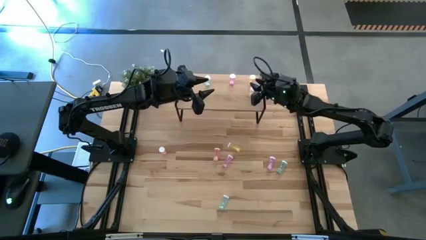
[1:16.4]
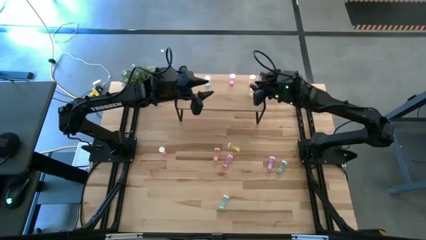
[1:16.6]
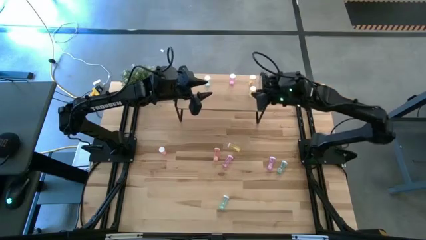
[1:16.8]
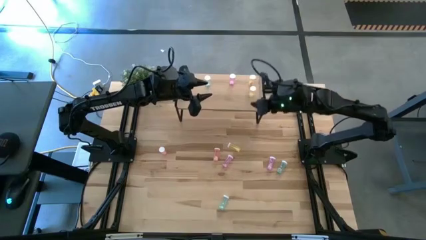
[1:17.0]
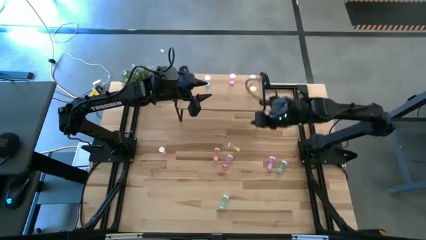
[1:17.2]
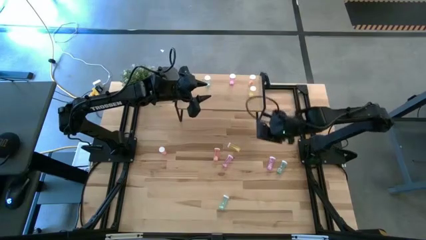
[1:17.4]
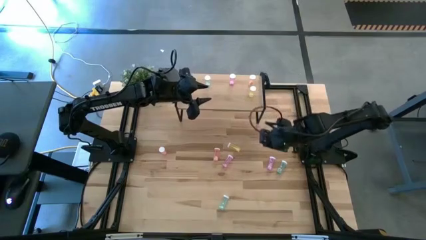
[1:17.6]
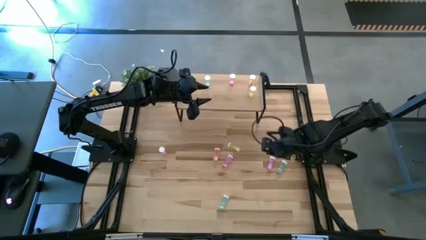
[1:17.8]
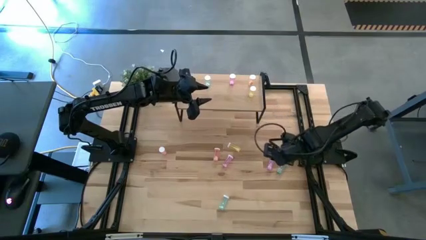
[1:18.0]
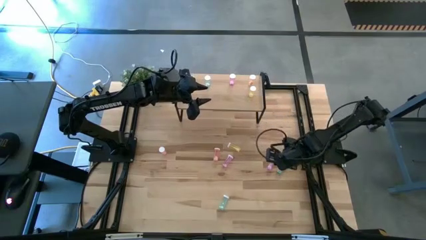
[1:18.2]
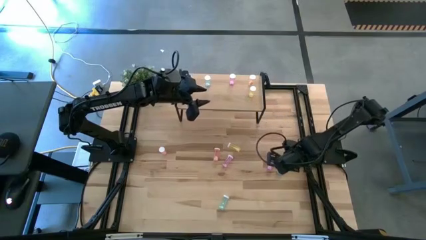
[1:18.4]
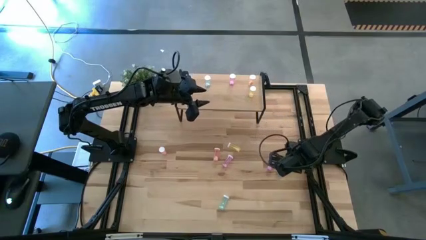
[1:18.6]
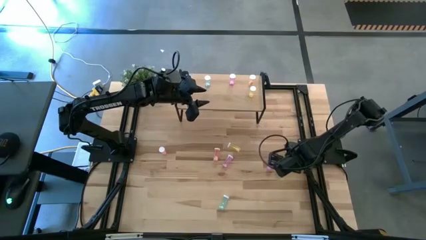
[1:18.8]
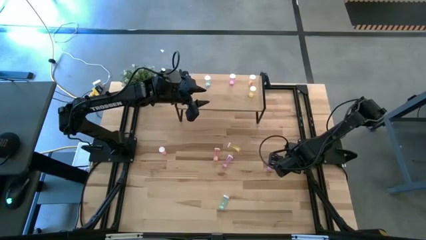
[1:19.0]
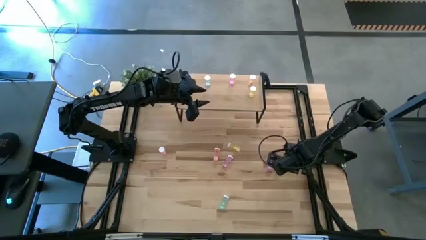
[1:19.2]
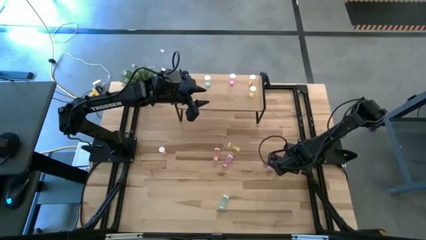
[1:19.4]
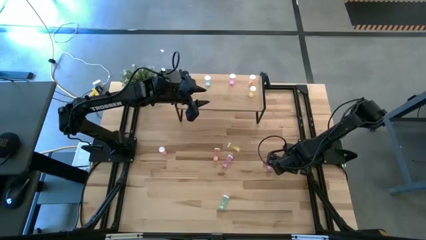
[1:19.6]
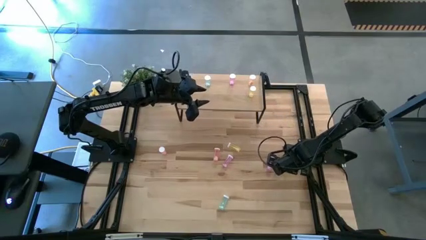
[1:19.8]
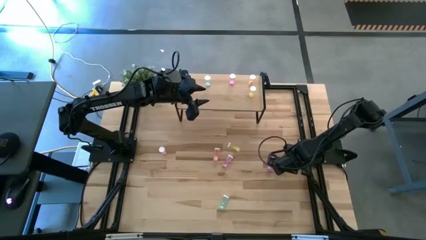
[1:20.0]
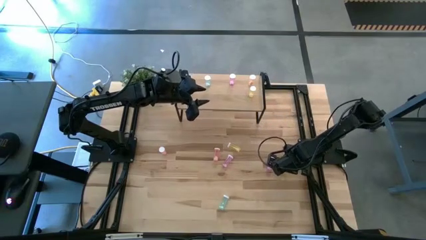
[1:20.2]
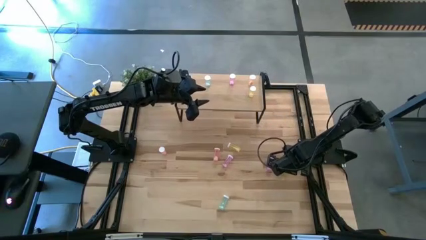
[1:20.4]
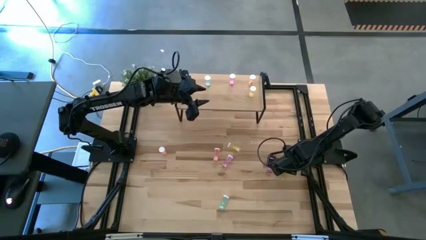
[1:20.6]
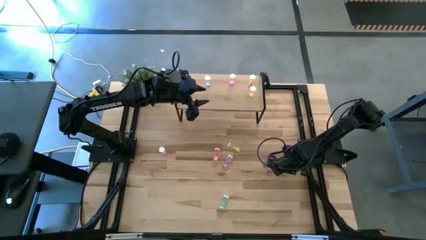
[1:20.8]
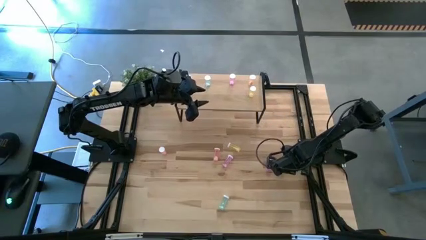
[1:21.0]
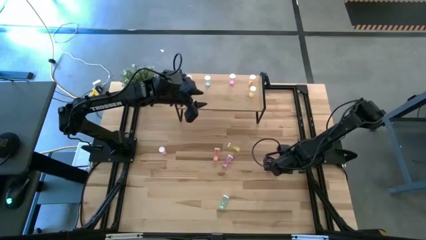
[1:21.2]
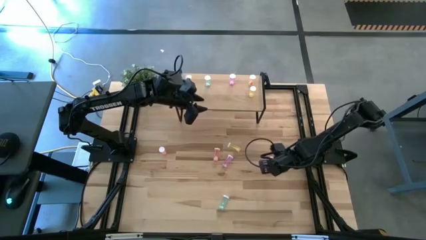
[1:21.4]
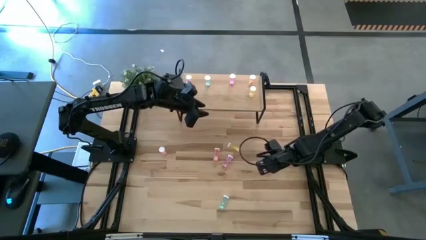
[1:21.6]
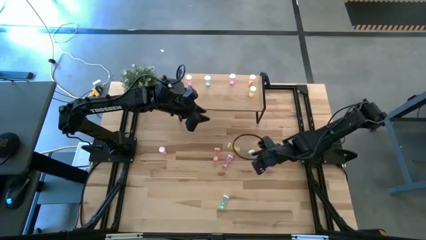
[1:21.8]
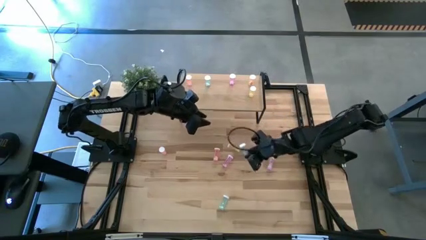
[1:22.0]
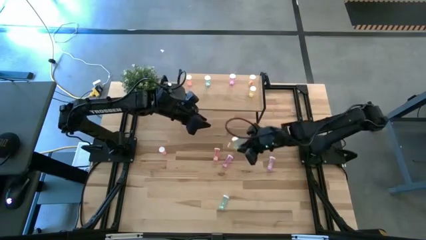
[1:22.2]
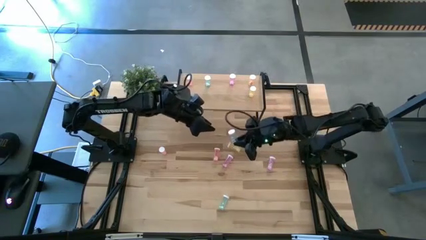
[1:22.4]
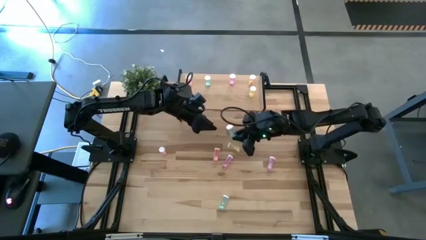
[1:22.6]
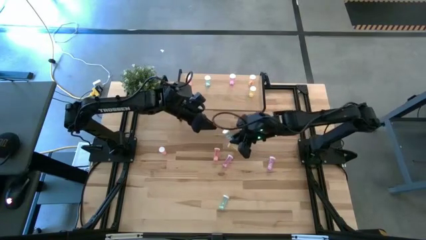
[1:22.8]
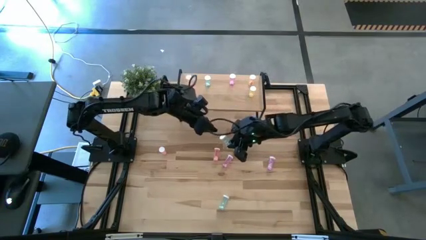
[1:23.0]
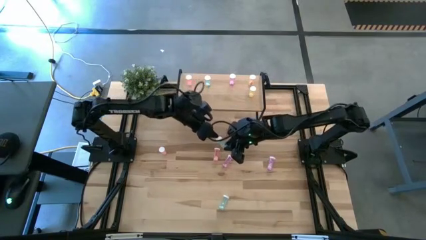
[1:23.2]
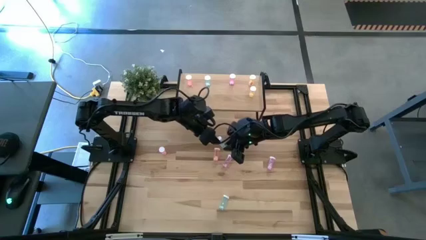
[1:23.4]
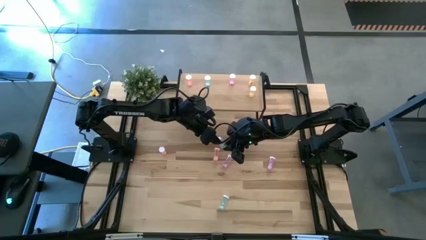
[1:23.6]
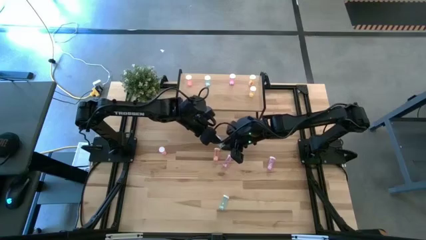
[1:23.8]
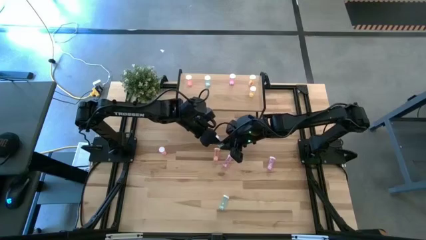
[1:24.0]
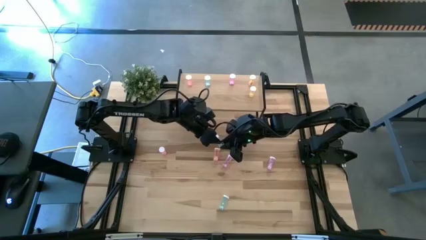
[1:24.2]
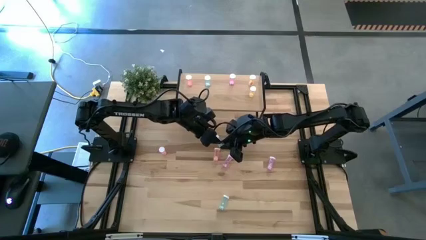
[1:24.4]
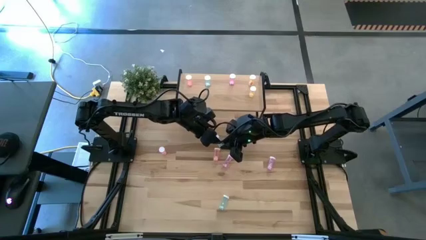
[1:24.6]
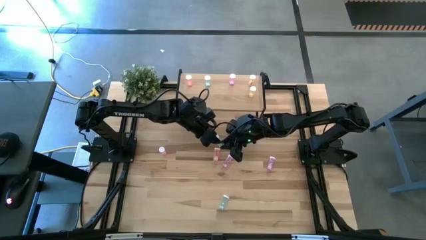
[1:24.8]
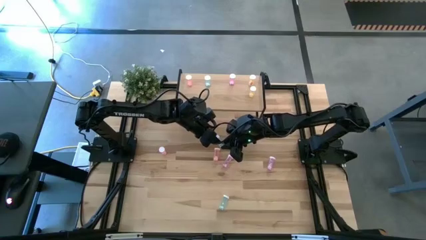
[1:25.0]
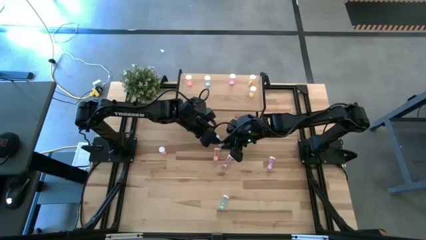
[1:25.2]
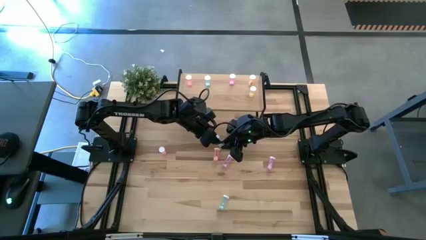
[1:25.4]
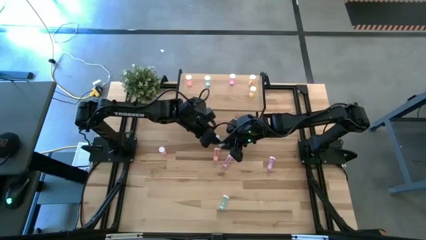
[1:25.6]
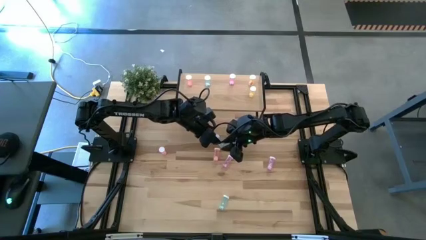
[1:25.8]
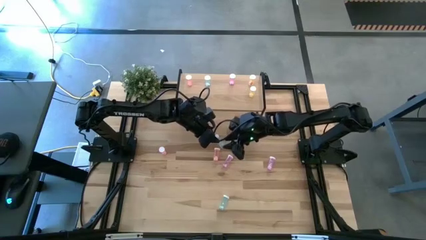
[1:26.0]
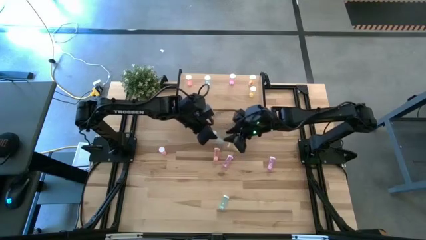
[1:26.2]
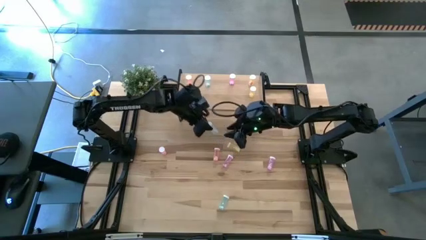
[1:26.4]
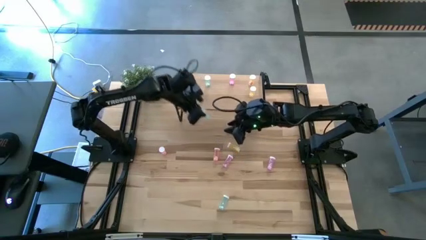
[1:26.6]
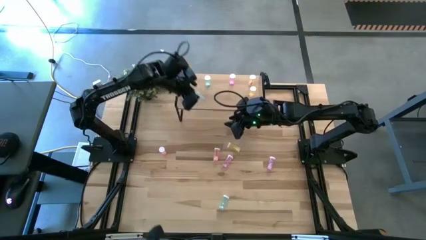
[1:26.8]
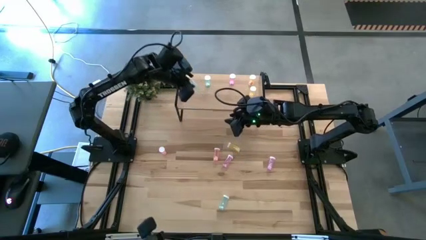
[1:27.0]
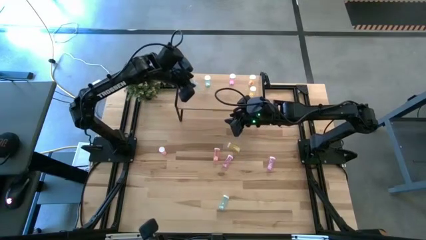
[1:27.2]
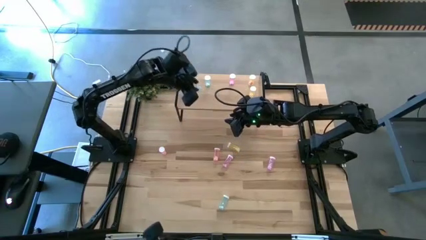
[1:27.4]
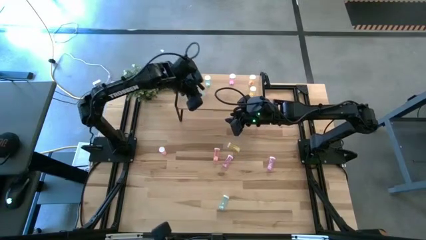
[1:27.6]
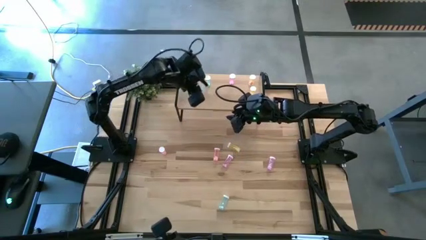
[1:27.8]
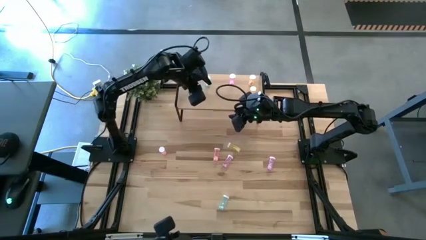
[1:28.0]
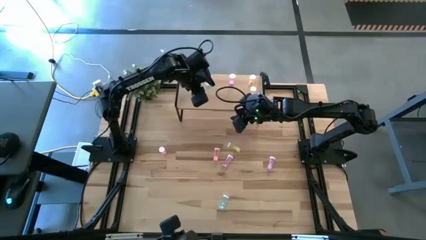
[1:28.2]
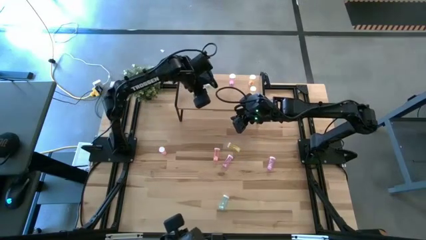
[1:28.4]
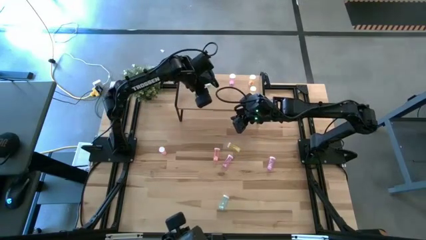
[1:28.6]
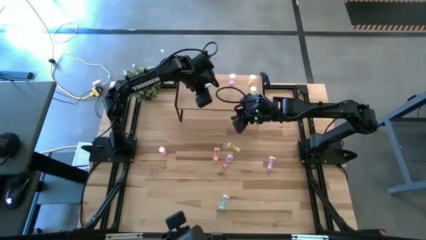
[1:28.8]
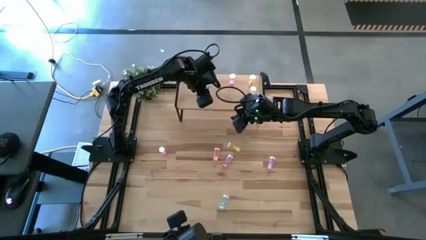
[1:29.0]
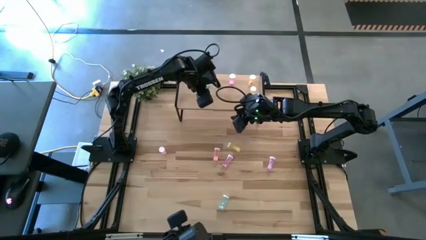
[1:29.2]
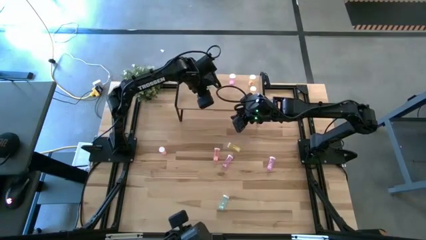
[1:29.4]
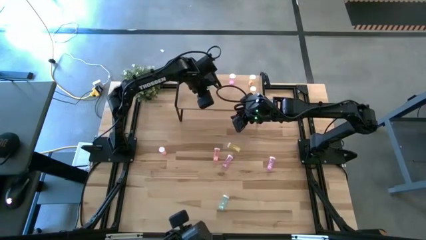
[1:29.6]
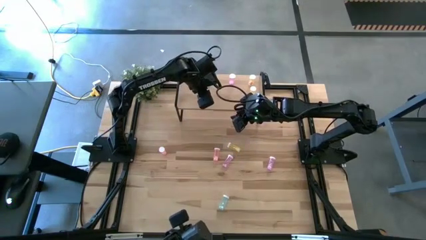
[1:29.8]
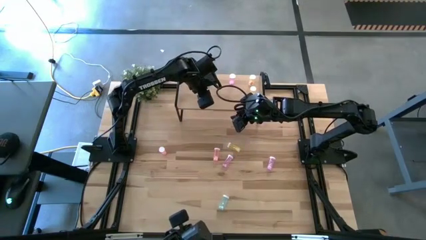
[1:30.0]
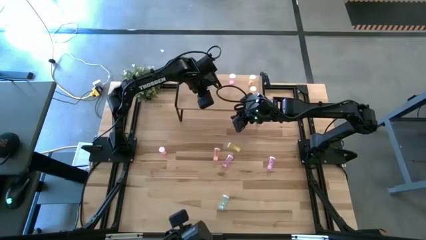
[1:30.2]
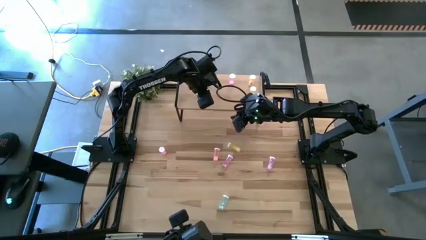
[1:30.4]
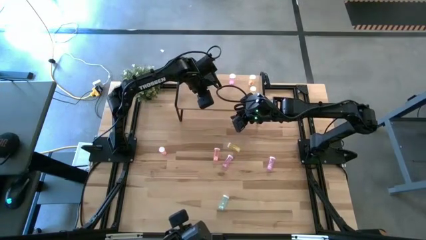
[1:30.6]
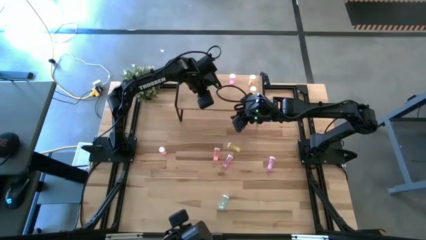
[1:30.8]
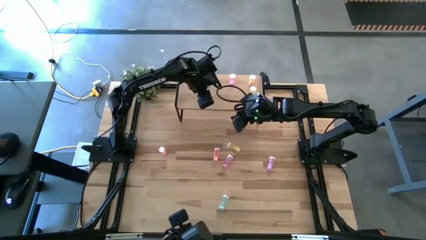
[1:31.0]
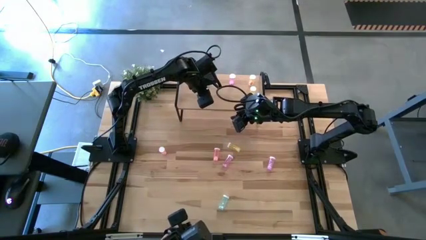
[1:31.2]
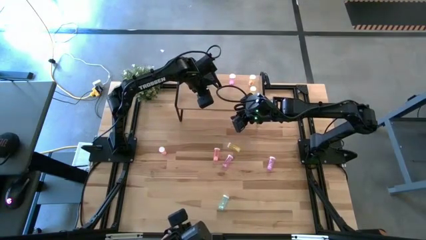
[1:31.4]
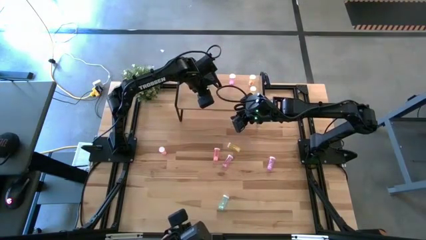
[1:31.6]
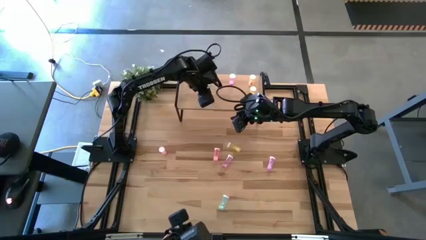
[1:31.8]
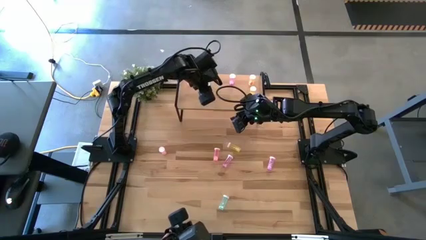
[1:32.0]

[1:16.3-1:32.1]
Task: Pick and place medicine bottles onto shelf by color
Put the top right blue pill bottle on the shelf aligned with the other blue pill bottle
